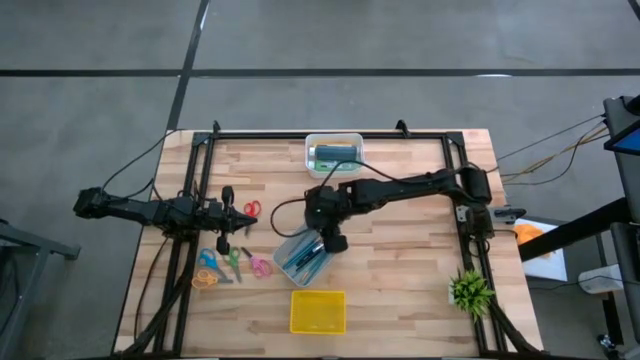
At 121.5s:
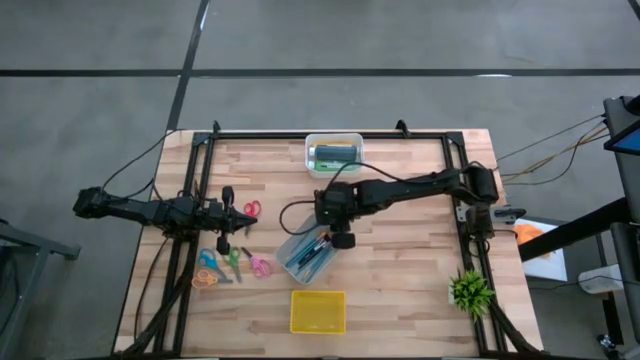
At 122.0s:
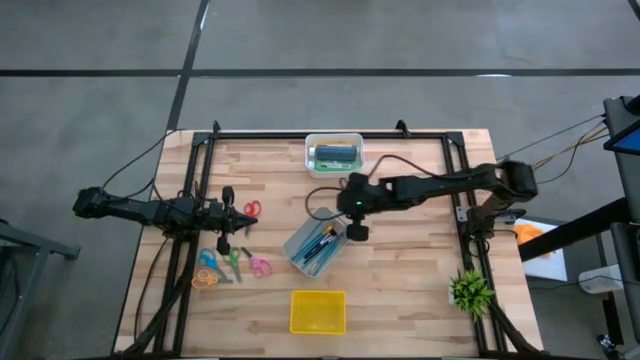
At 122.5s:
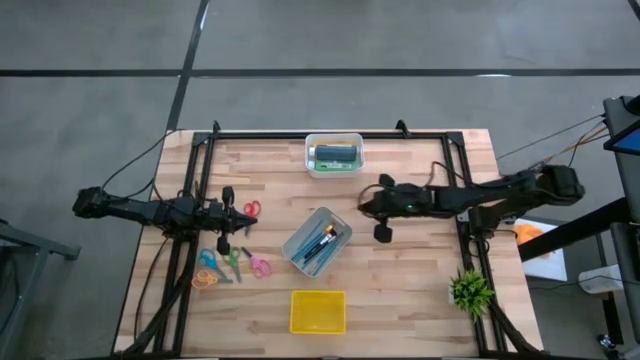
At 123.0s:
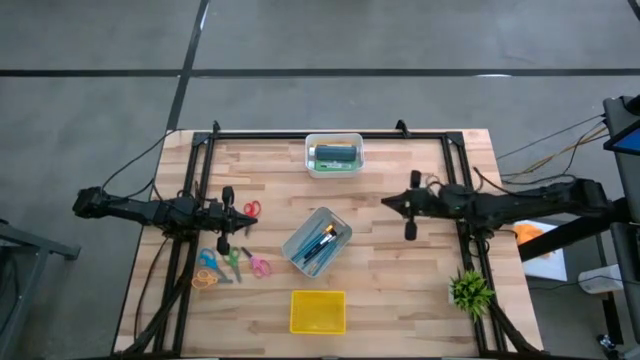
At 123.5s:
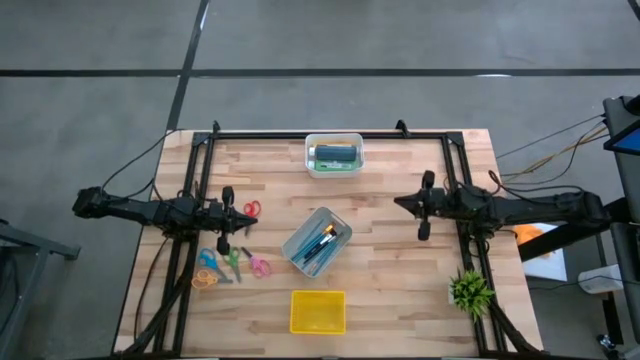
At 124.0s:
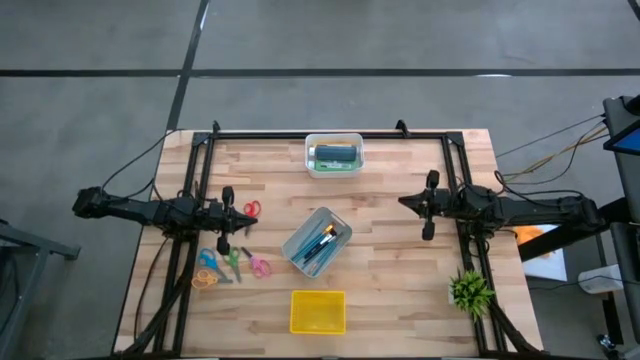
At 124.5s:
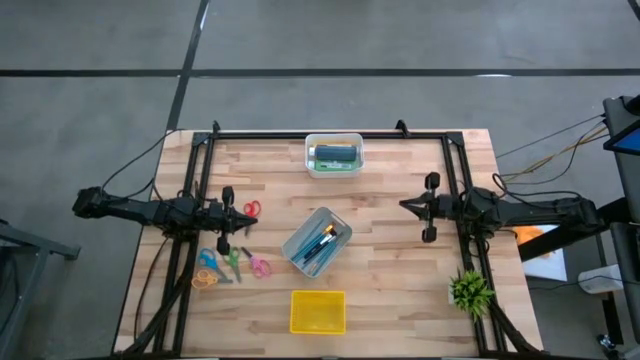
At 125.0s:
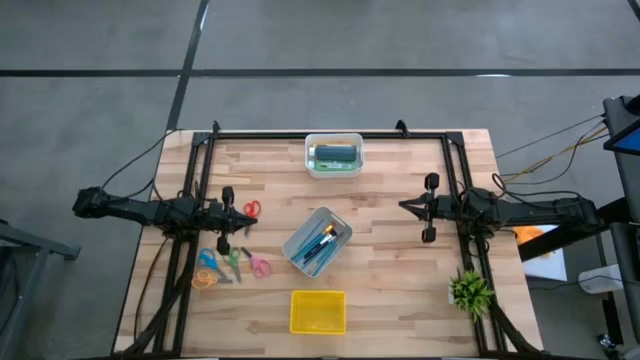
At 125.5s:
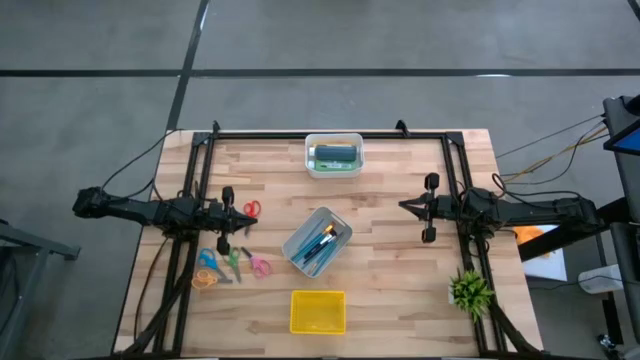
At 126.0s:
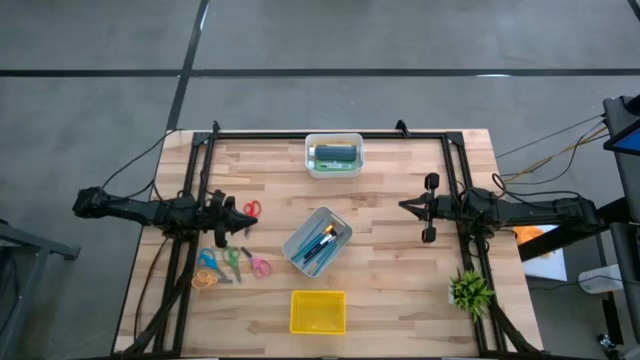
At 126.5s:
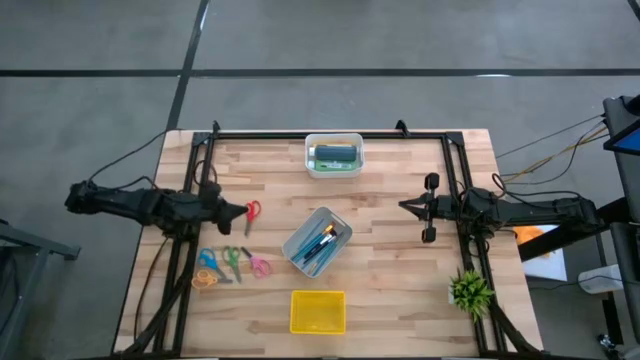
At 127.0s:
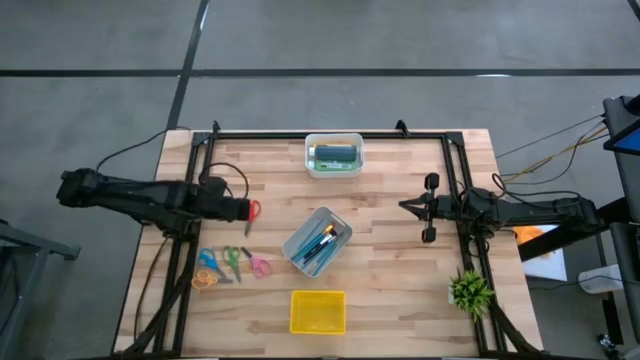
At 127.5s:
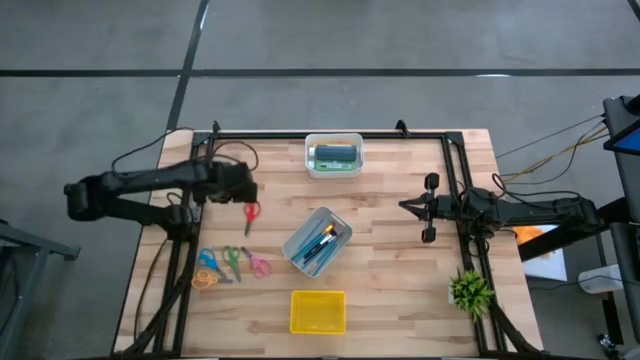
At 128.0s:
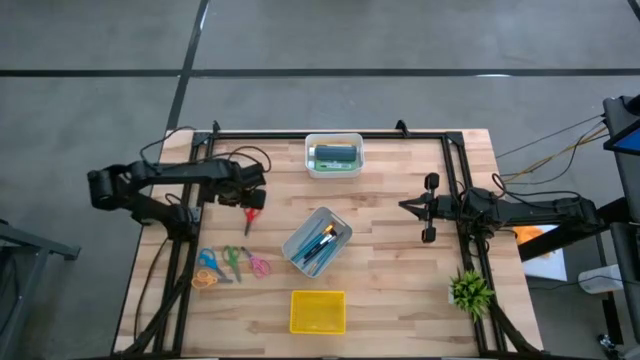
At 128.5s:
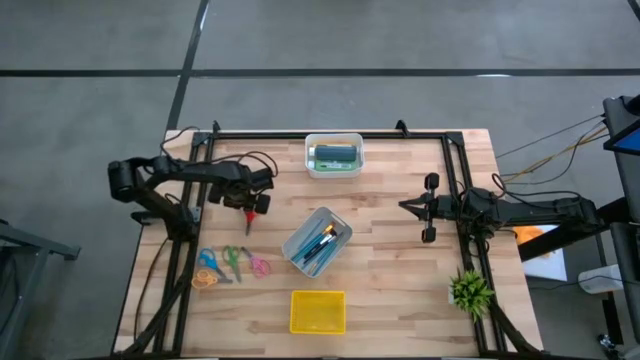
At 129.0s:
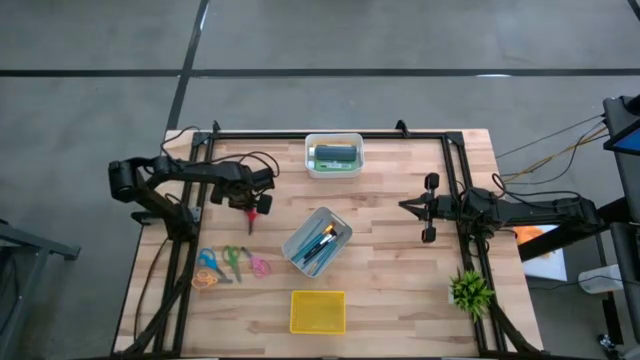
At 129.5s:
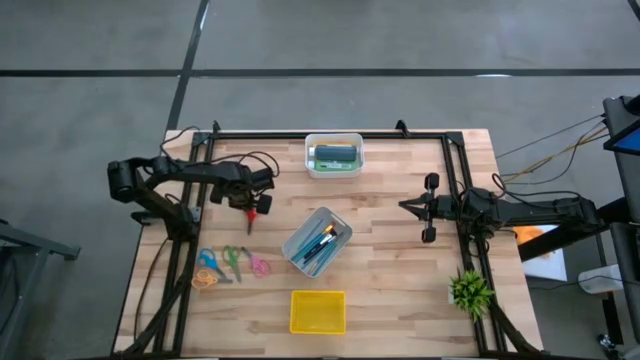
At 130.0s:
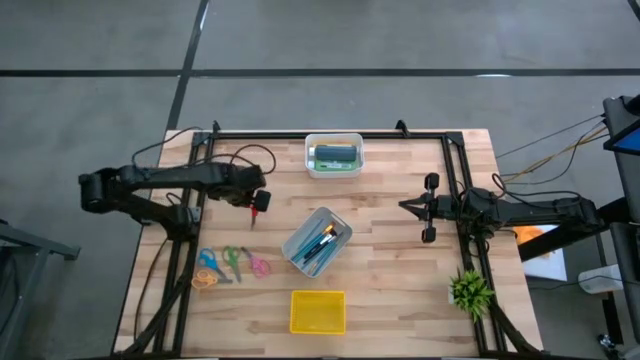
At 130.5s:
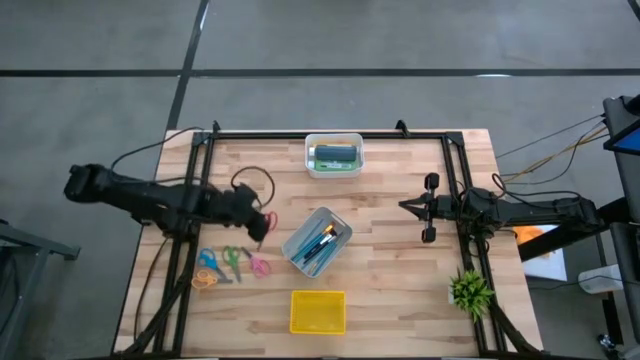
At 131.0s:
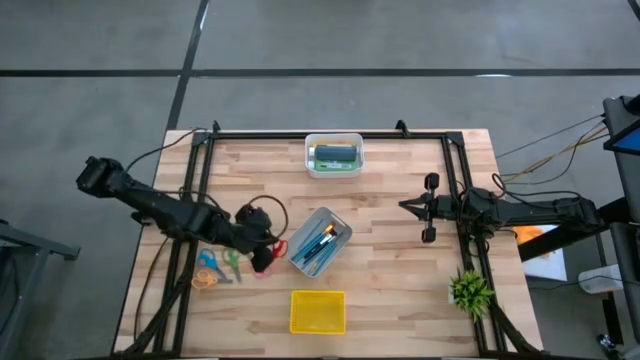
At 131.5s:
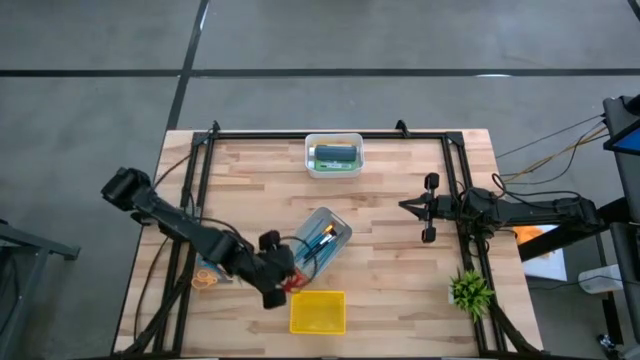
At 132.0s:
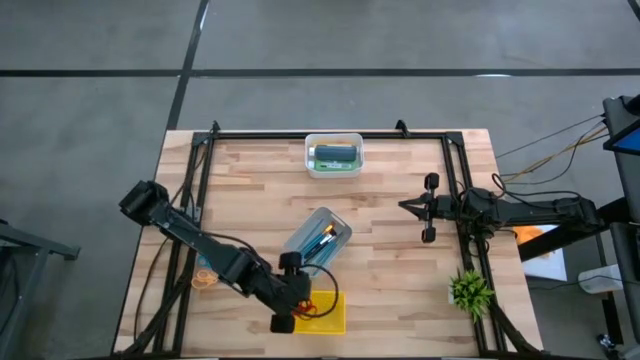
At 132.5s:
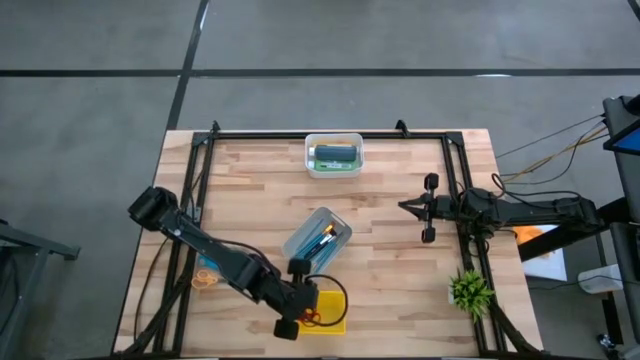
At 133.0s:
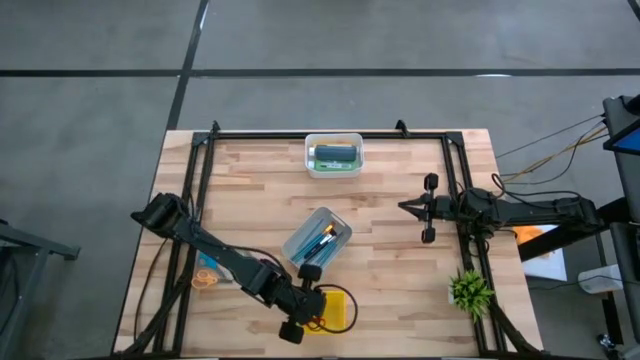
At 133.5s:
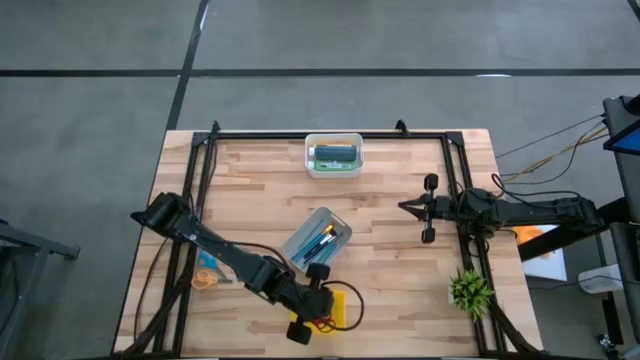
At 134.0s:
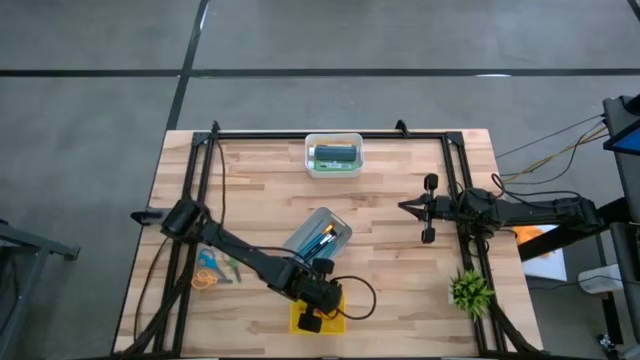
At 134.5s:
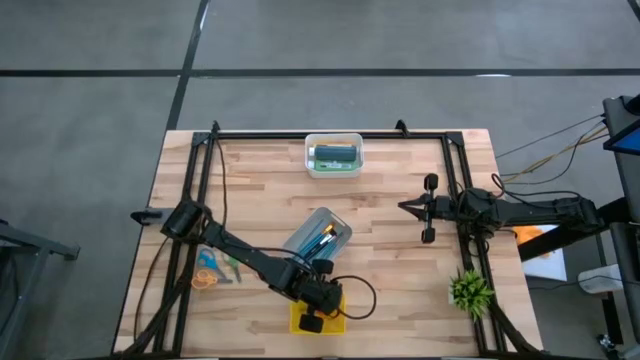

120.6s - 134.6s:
Task: Pick & Place Paint Supplies
Put the red scissors into the yellow bin

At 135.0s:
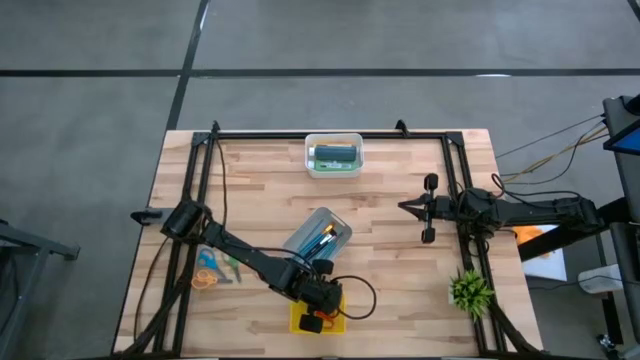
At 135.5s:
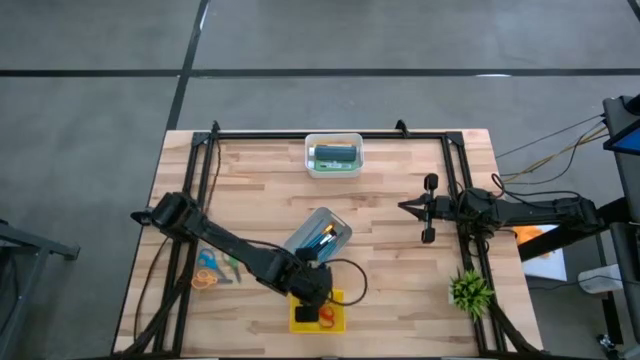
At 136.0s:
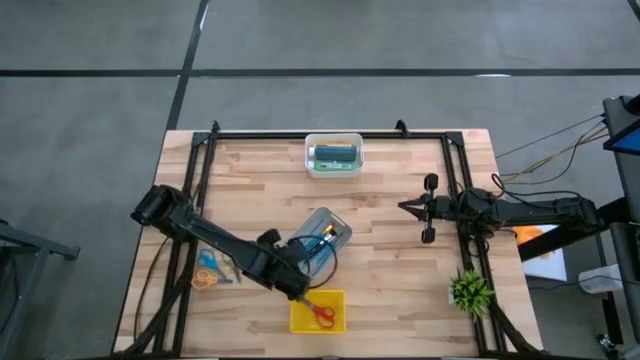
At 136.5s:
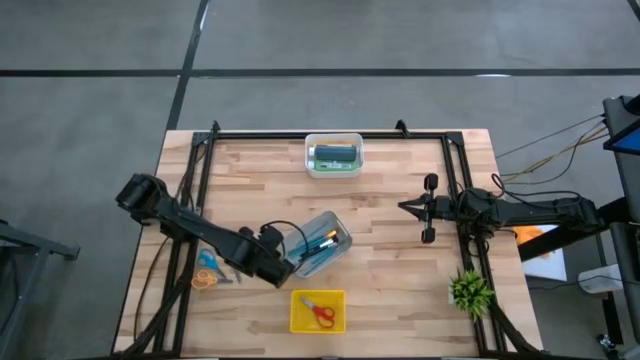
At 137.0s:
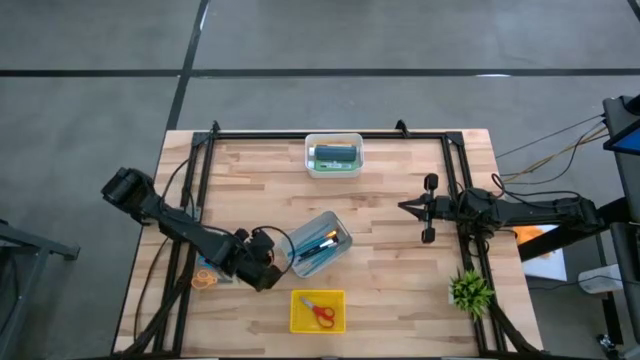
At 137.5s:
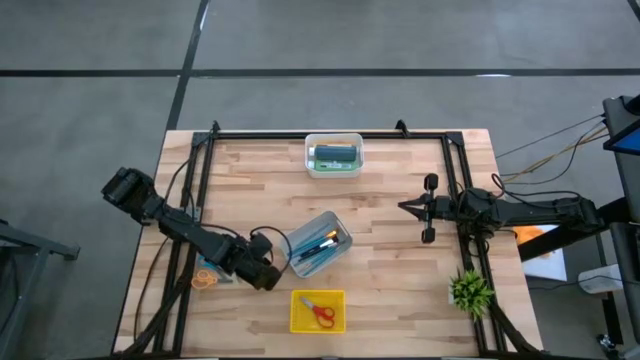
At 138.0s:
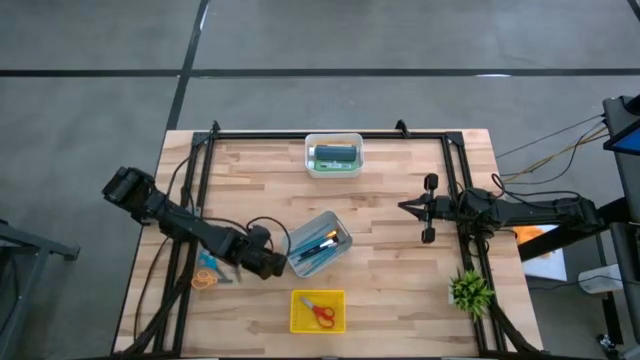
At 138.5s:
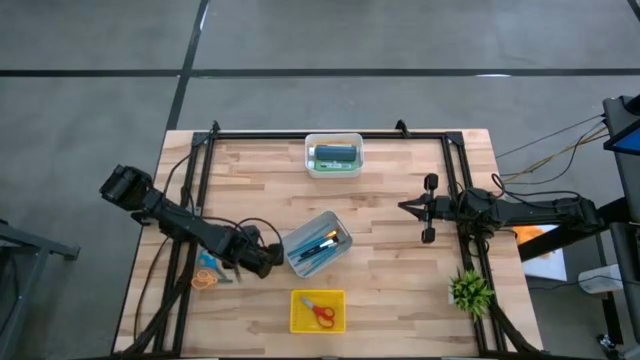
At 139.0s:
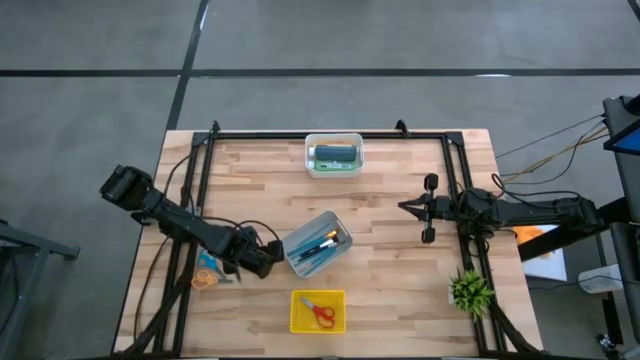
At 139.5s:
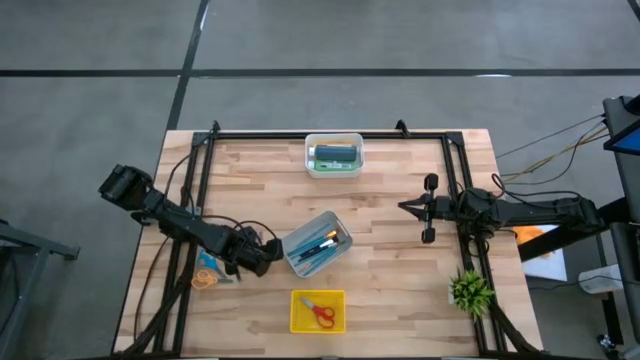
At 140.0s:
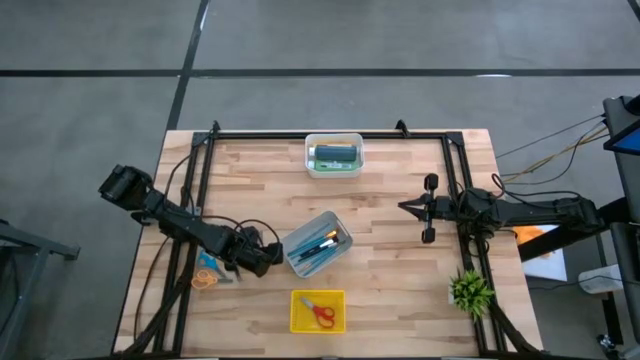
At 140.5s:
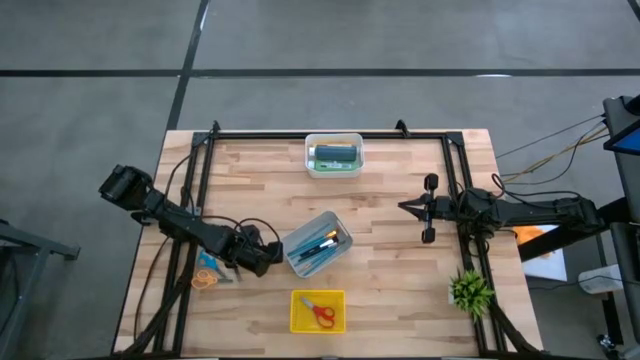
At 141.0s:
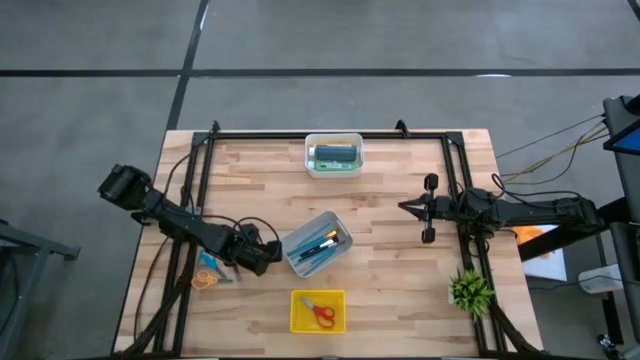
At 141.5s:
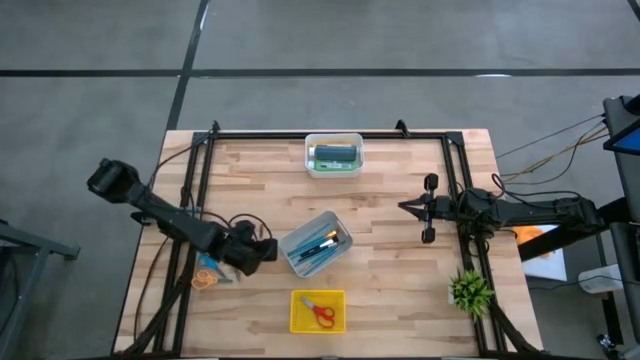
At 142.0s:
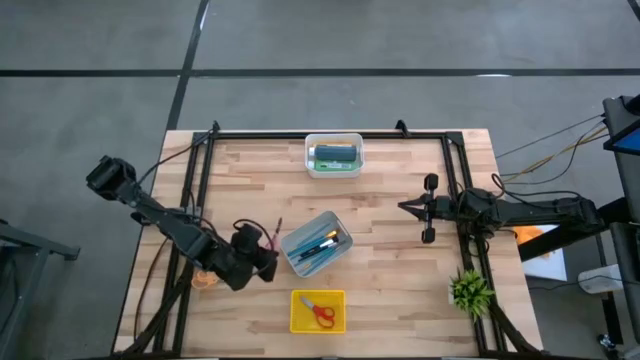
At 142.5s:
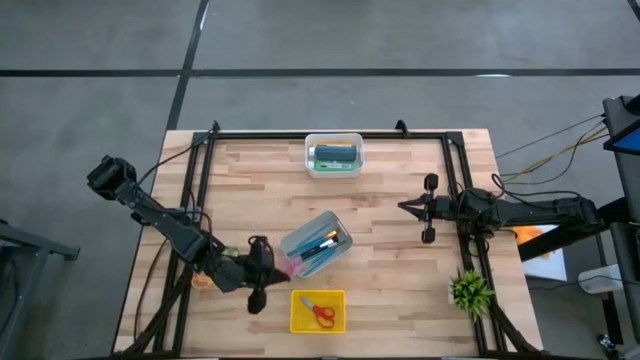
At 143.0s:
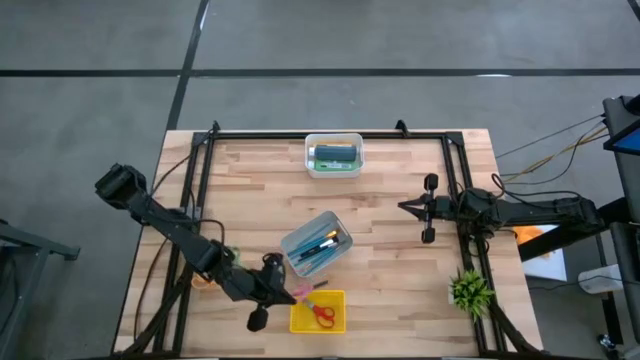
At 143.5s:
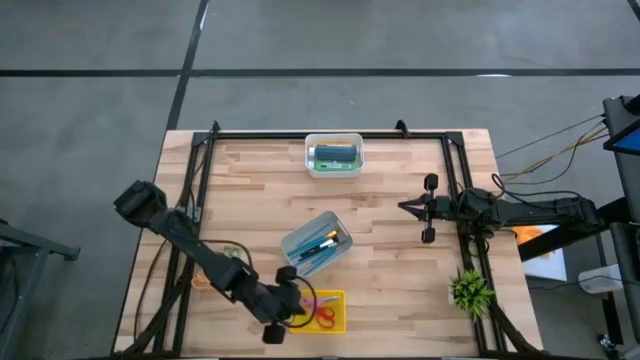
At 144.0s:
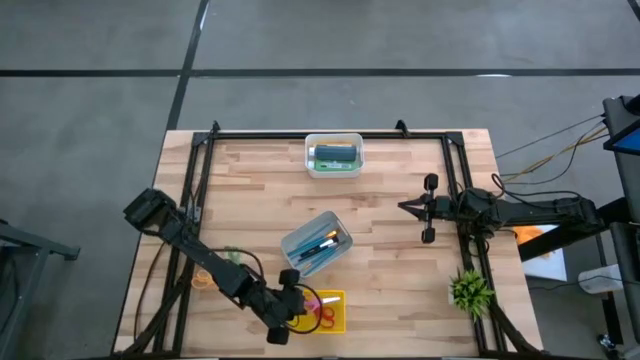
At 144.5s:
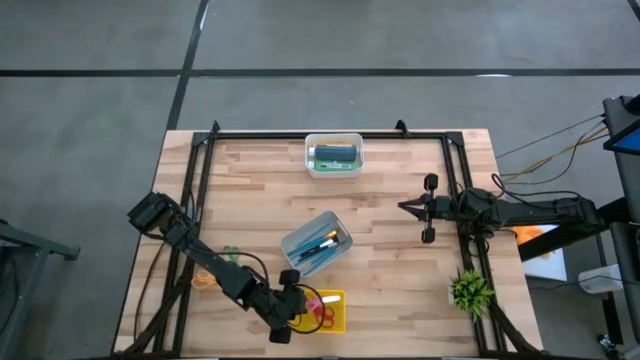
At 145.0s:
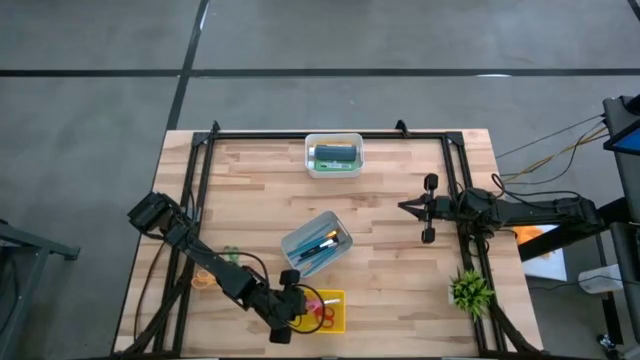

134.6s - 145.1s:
Put the pink scissors into the yellow bin
